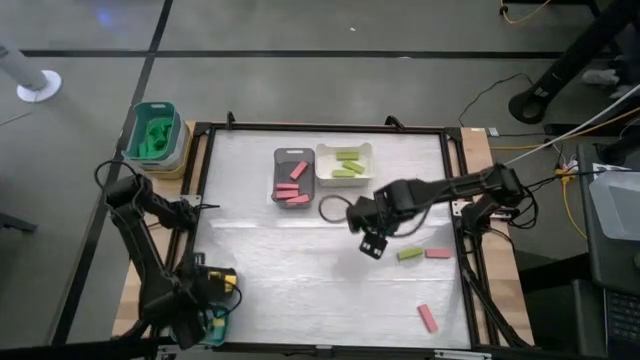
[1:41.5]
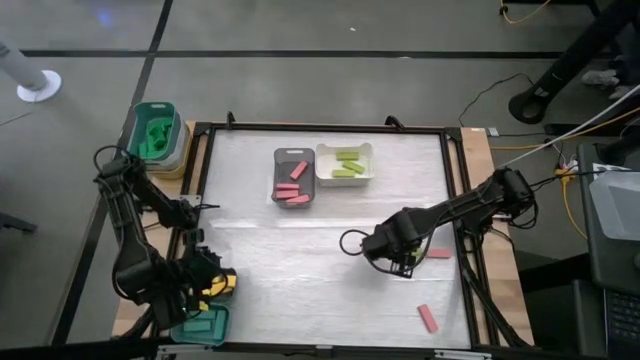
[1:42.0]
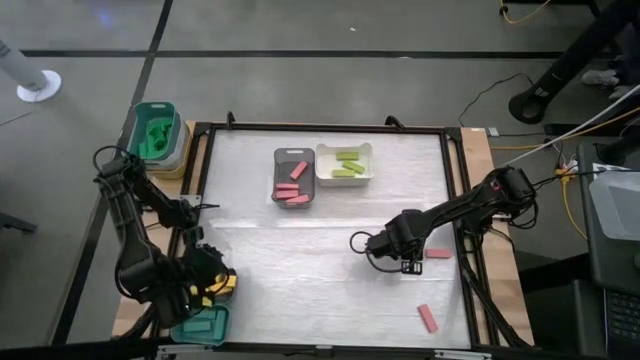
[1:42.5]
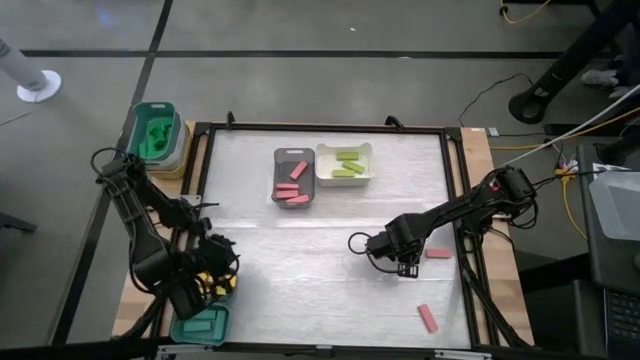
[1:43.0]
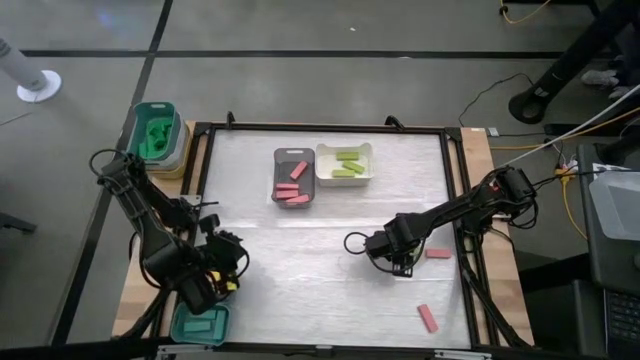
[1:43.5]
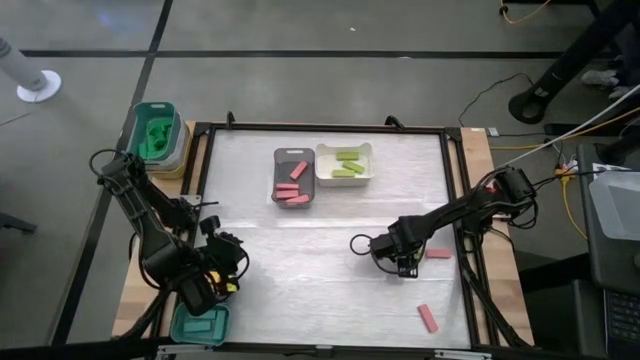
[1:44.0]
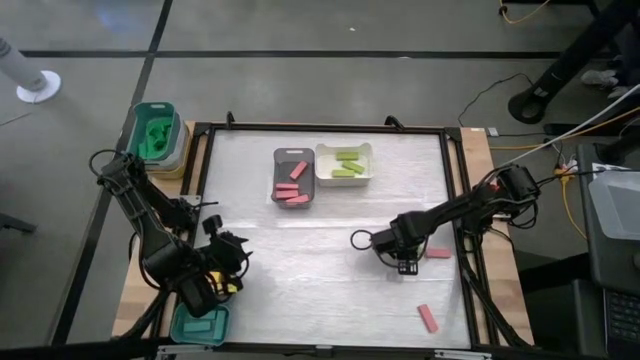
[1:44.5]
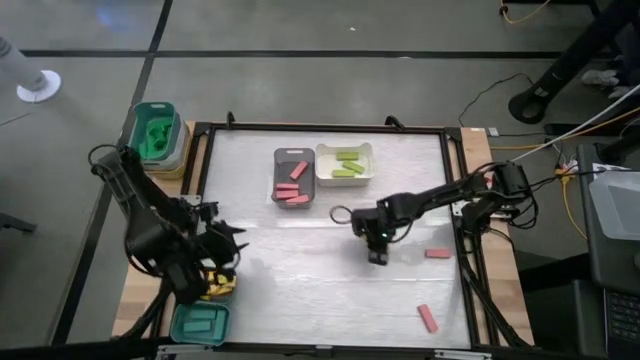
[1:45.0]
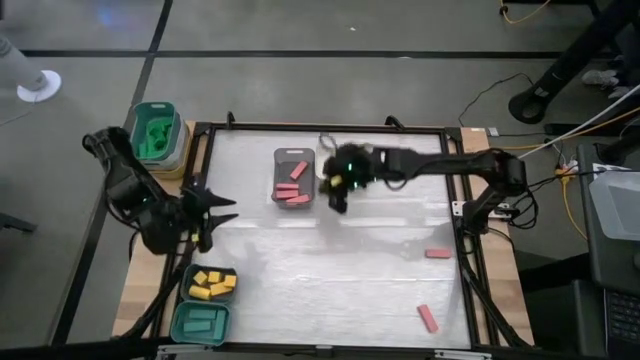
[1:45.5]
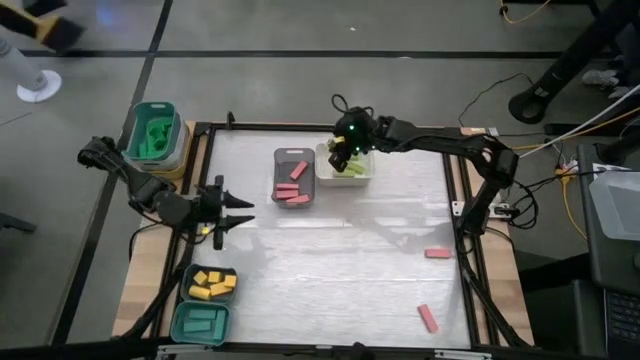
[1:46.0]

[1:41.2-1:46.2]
Task: Sort blocks
Put the green block into the white bin

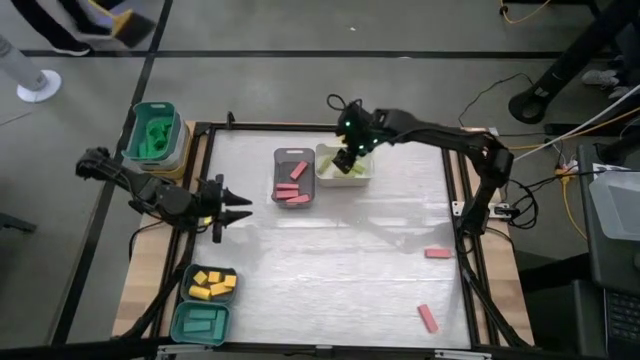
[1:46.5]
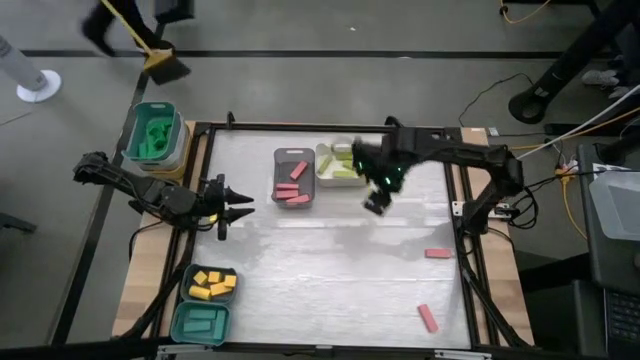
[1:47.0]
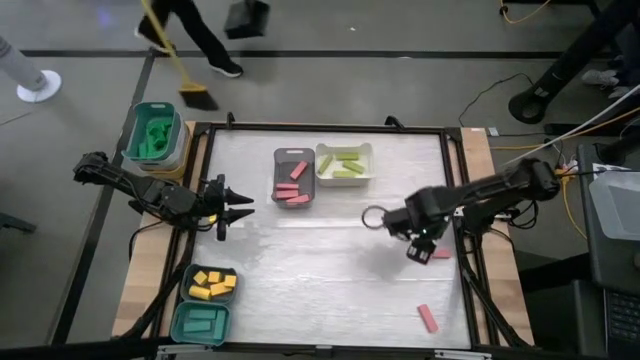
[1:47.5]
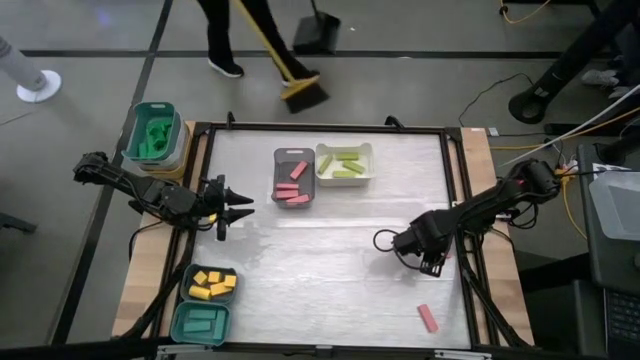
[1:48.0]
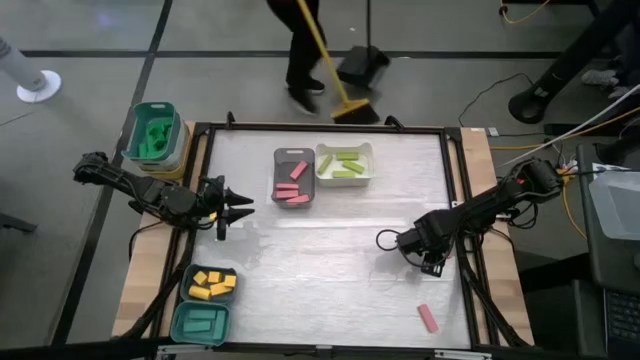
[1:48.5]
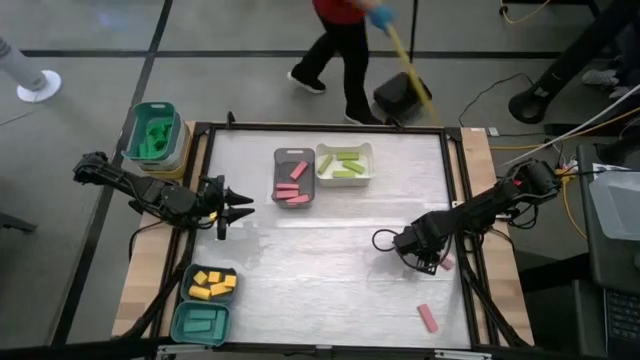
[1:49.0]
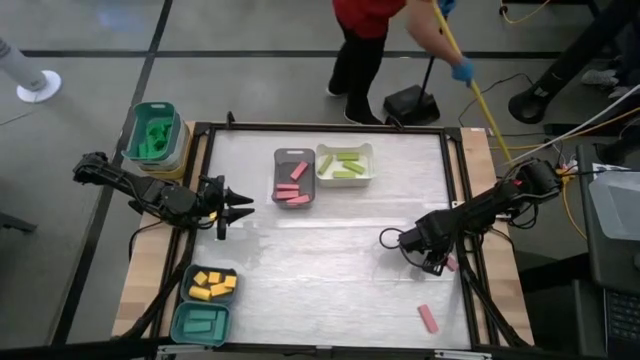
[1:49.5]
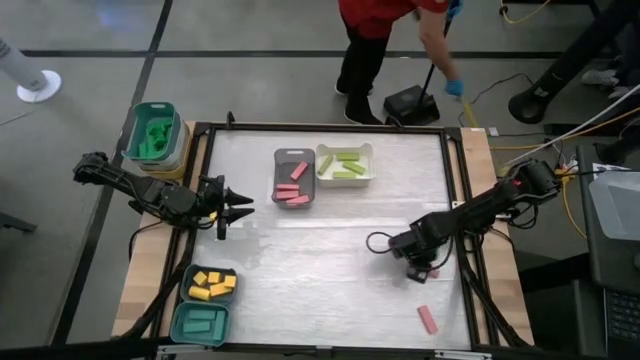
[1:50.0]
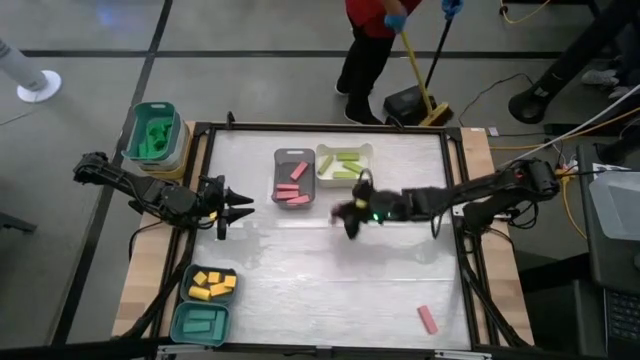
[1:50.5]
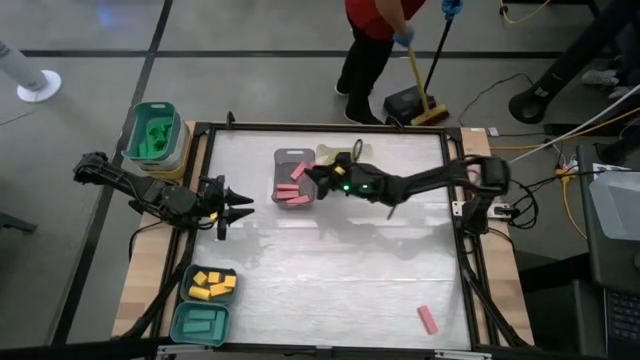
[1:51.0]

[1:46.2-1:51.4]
Put the pink block into the black transparent bin

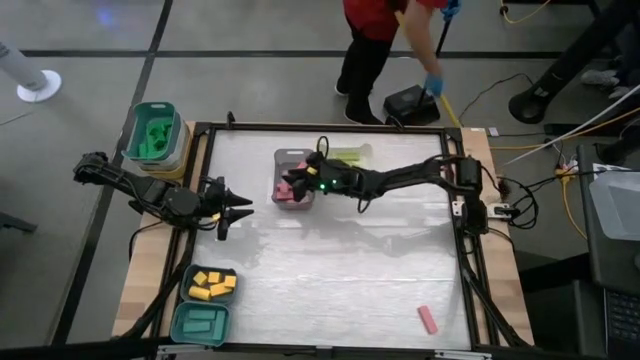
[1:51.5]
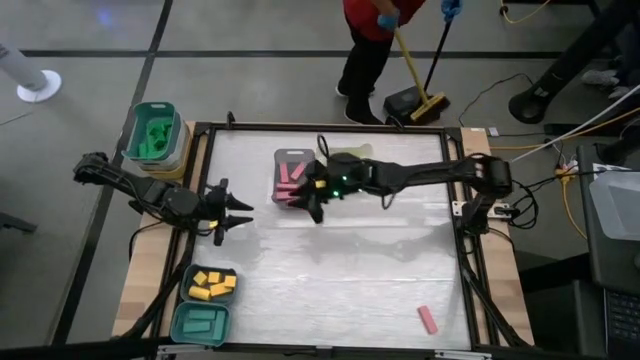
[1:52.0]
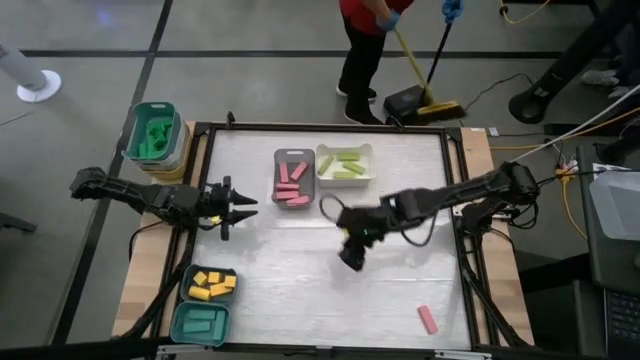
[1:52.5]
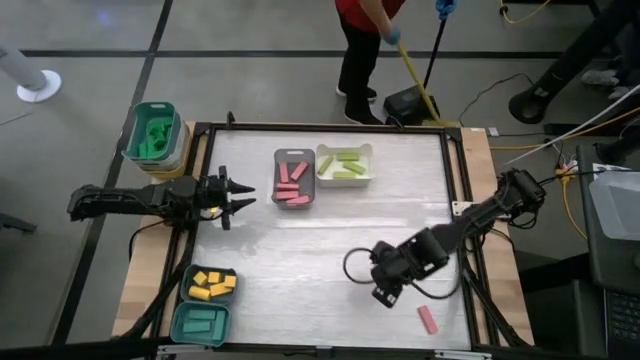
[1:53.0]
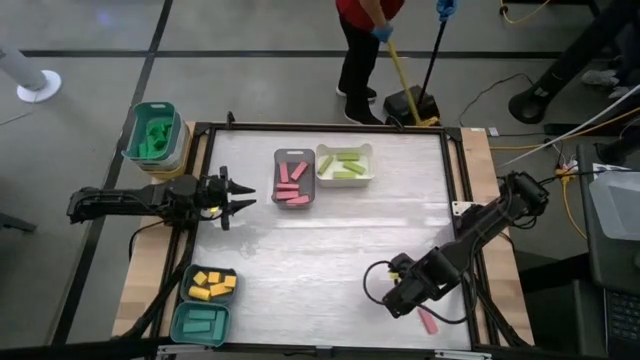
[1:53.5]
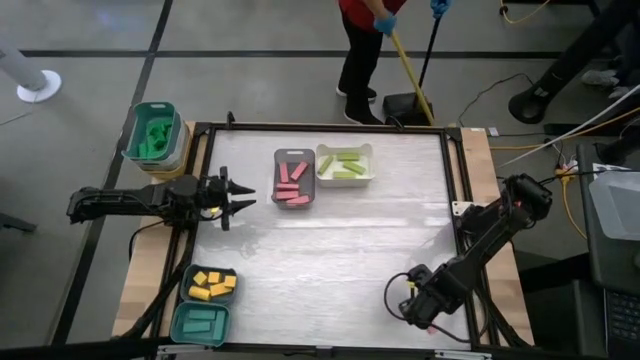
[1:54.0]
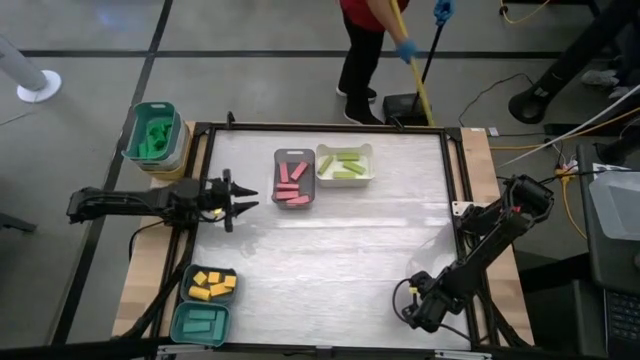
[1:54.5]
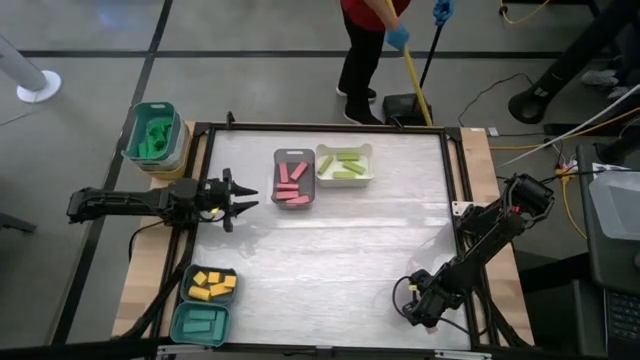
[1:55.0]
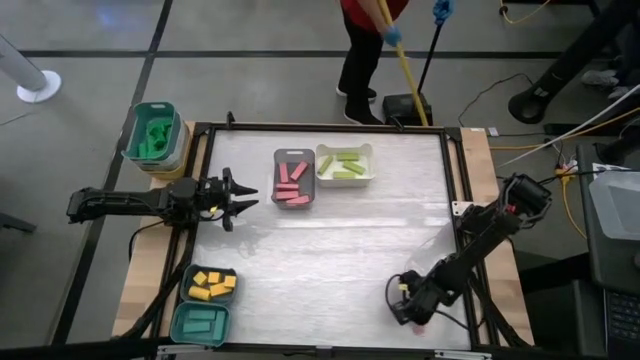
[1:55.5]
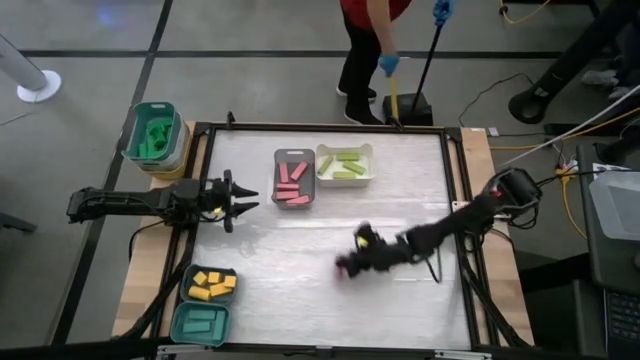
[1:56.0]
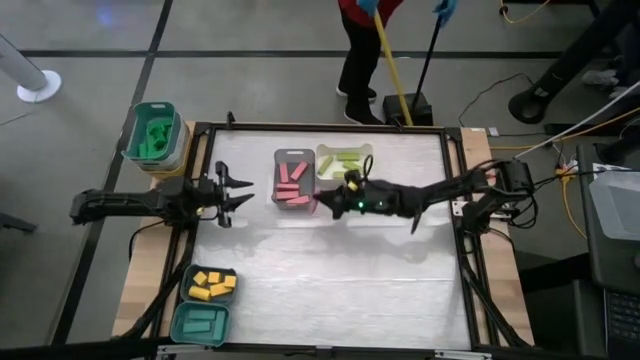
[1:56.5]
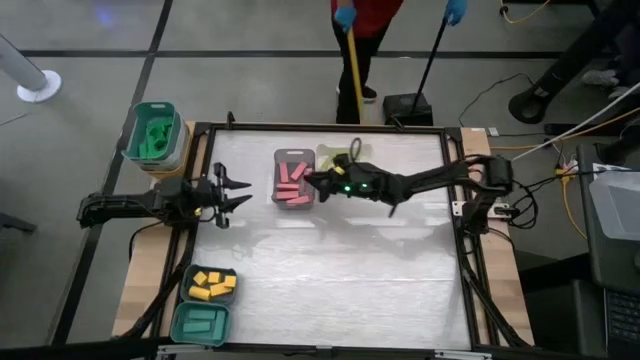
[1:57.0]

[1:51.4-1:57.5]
Put the pink block into the black bin

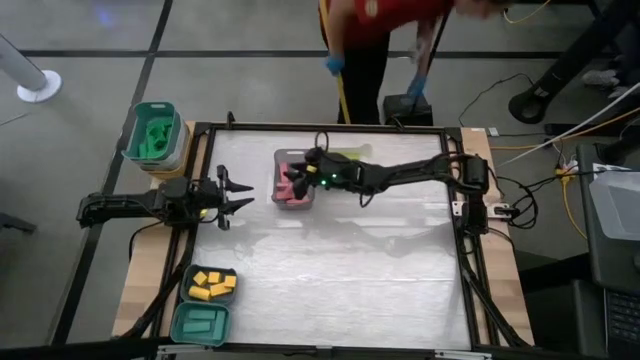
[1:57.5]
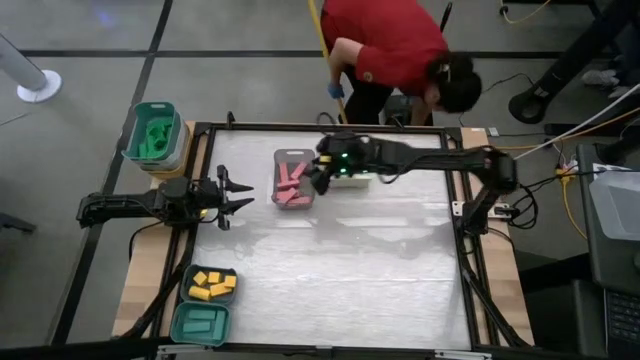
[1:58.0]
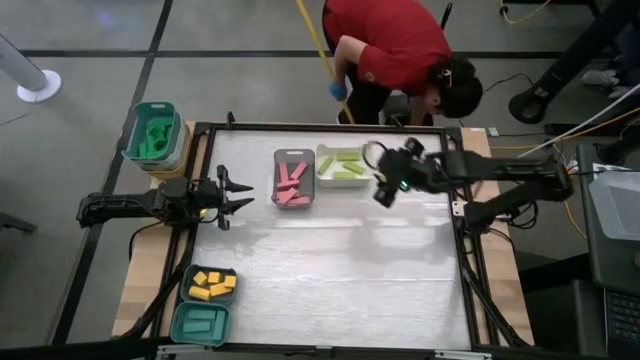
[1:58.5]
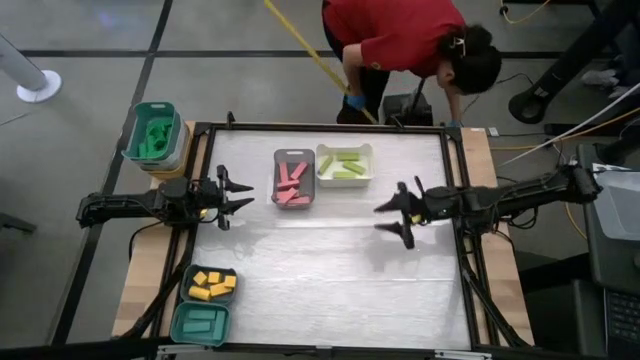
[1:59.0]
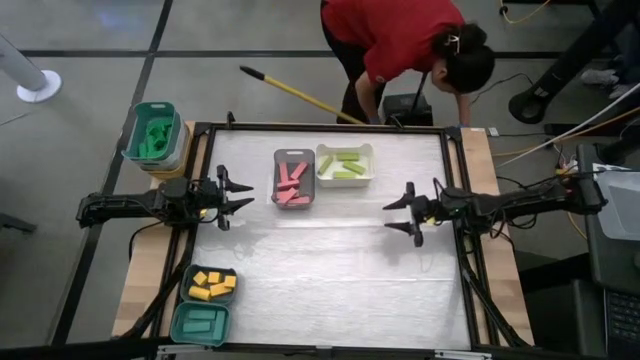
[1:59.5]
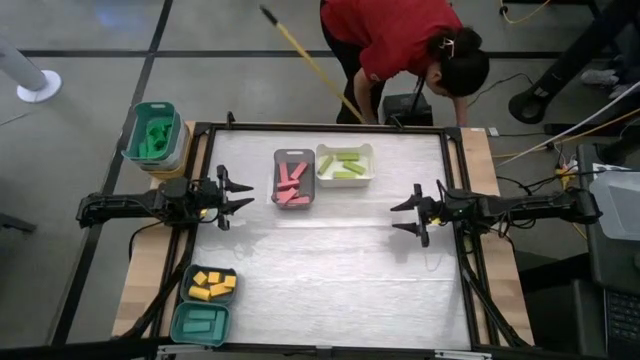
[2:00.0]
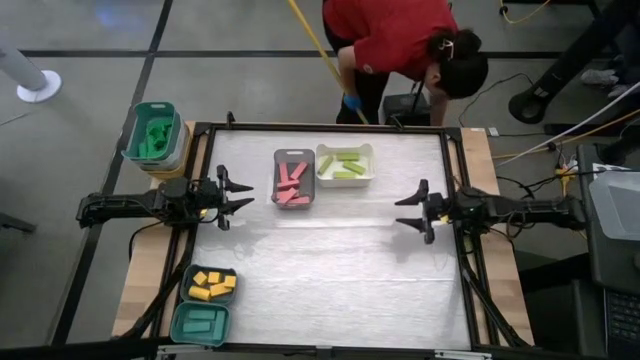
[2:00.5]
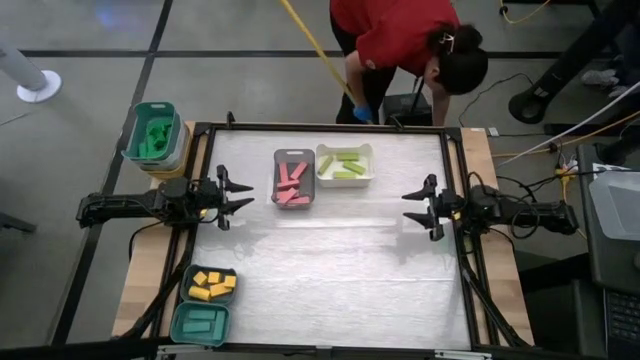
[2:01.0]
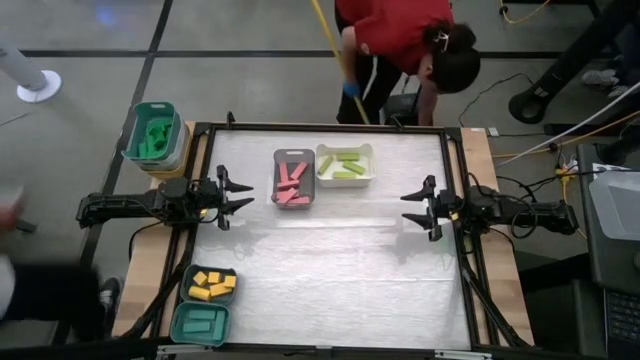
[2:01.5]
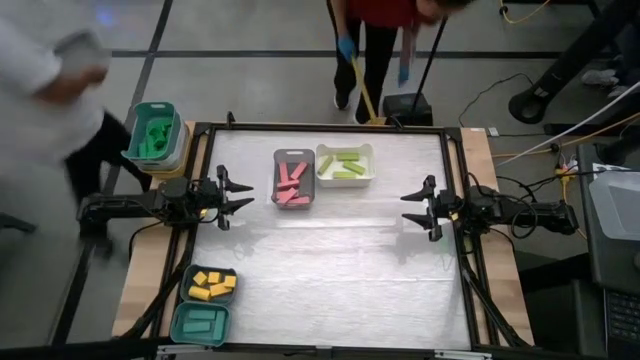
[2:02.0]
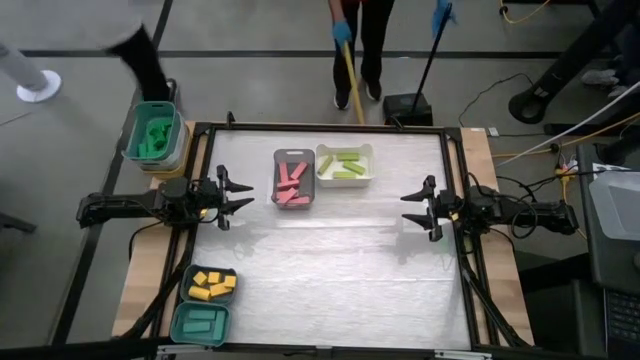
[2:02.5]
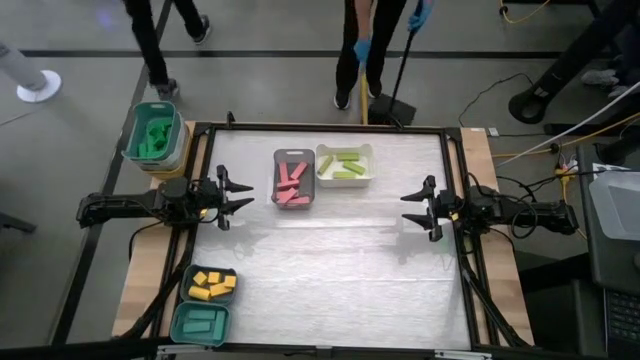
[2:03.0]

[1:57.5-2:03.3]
Return to Home Position
